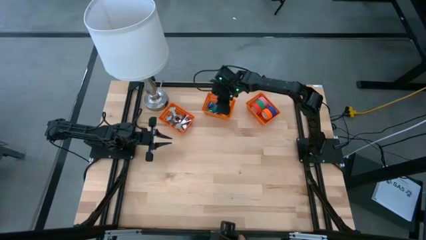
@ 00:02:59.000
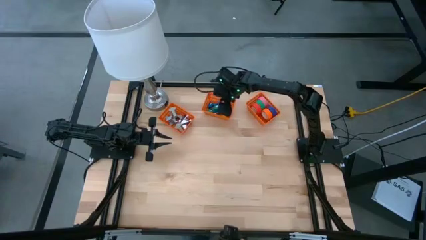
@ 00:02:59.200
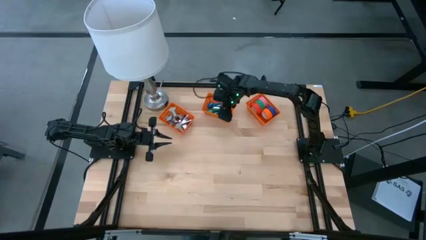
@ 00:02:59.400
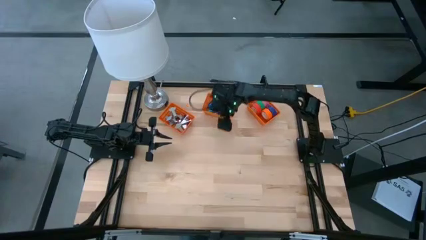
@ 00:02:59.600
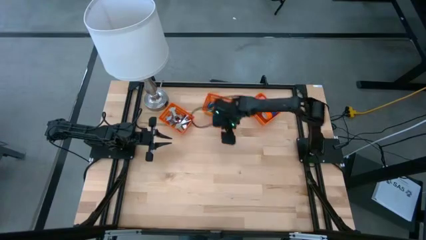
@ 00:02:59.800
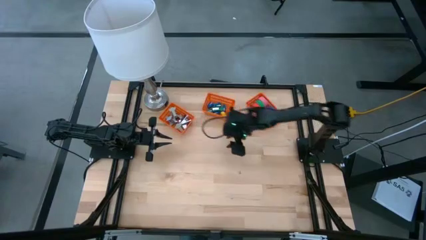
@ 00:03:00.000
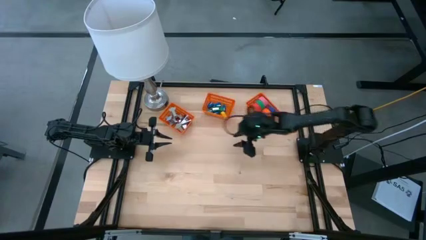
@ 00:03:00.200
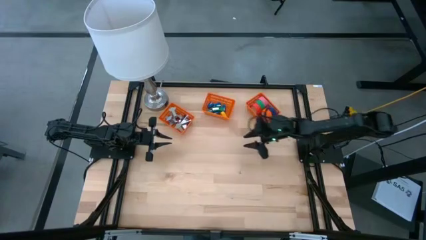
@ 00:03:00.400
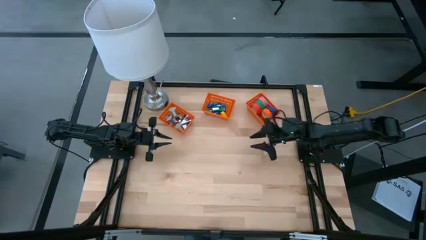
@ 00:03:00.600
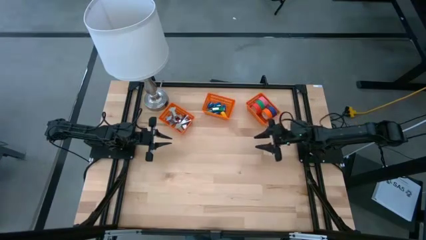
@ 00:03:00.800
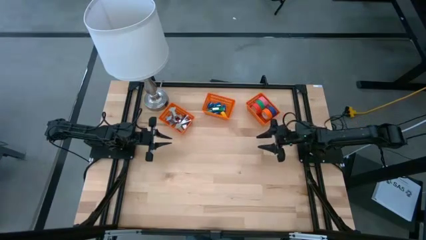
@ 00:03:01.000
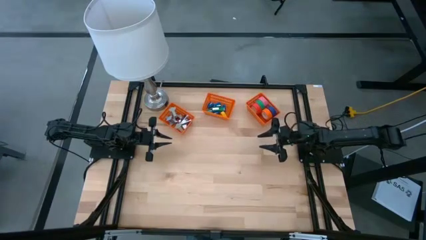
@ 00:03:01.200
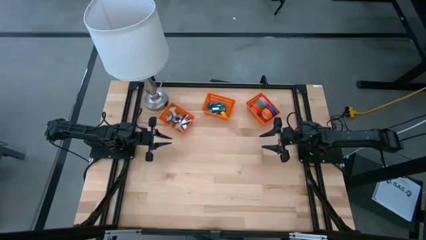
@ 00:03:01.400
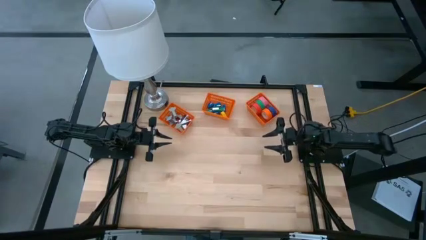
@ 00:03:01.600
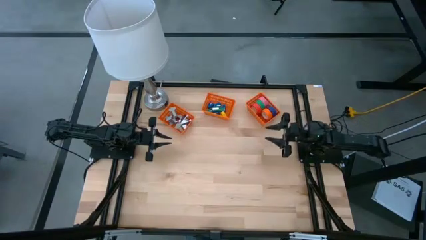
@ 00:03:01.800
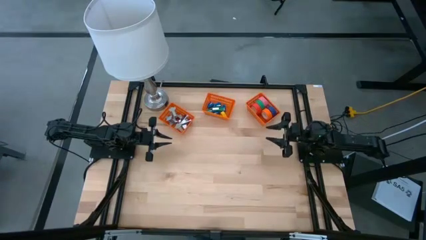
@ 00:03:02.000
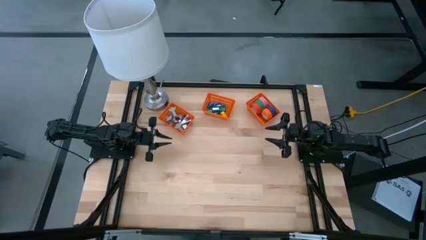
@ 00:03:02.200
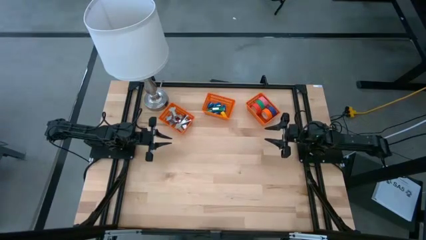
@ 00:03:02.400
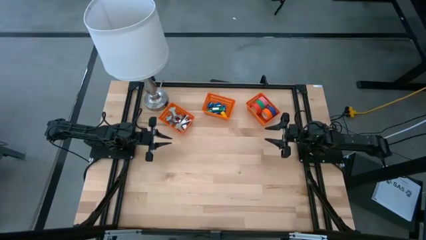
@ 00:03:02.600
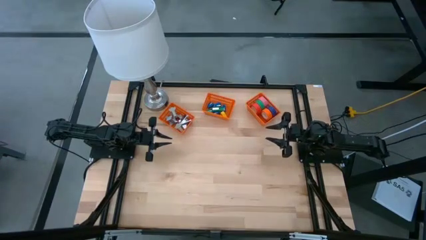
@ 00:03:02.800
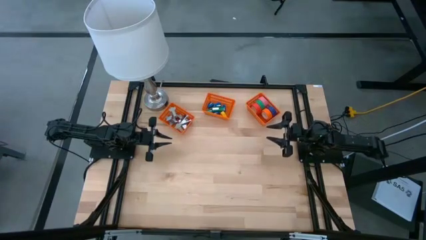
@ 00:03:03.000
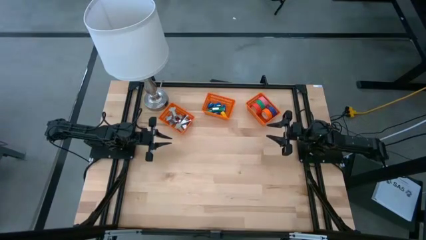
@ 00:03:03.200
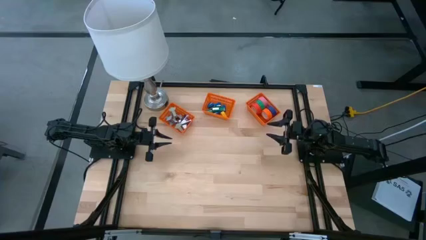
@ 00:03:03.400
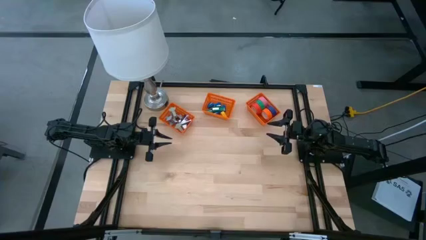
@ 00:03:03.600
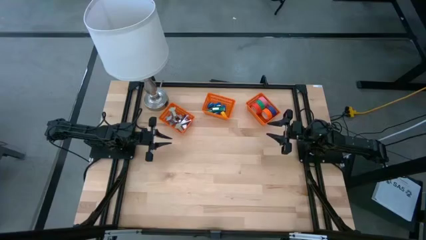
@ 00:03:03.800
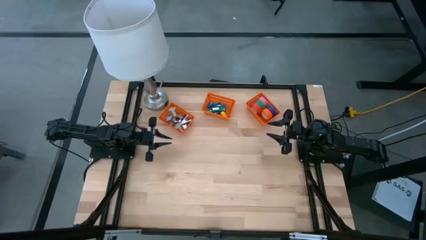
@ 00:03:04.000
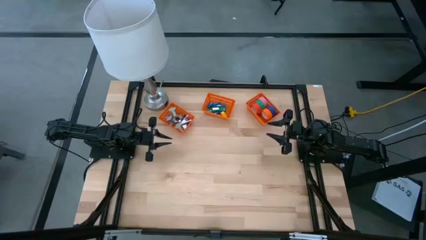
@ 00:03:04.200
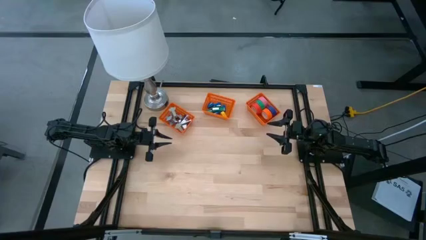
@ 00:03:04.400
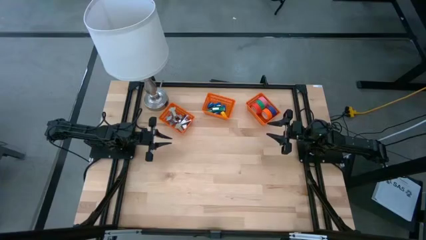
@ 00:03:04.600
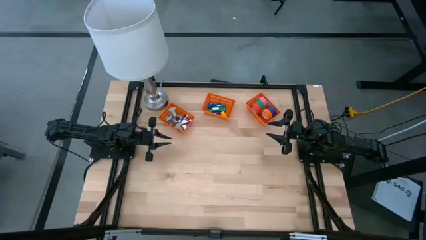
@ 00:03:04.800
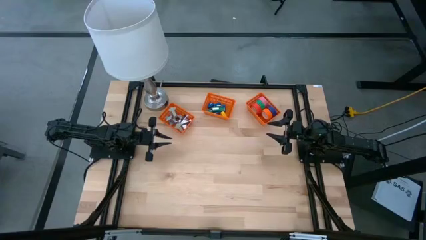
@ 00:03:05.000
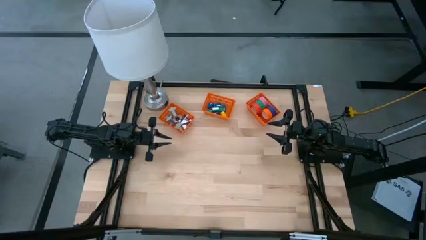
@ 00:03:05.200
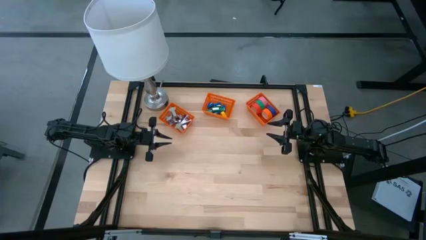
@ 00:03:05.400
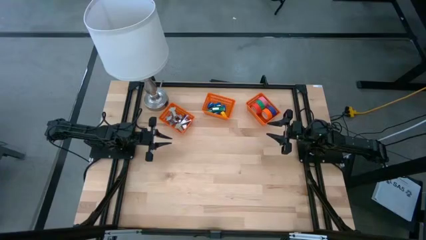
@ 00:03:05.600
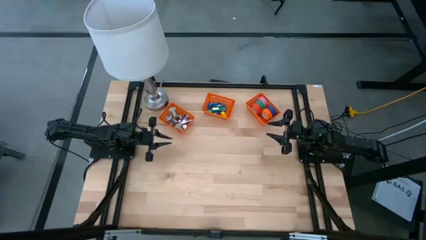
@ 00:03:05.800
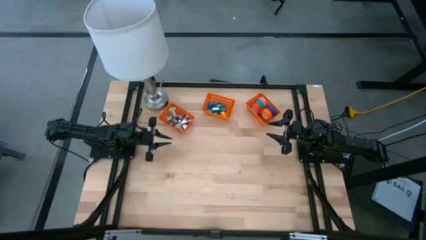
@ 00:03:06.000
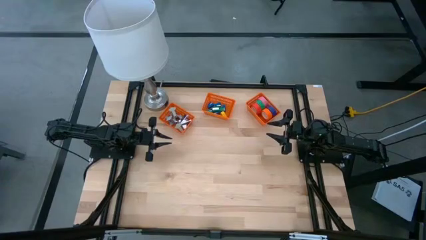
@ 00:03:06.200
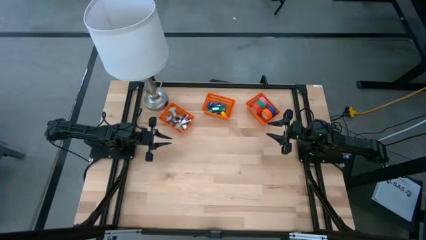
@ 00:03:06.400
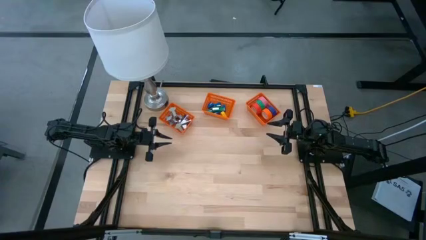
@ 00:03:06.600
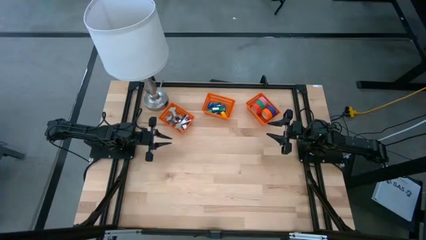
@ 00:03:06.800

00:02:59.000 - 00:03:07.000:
Task: Pick and place Stapler, Stapler remover, tape
Return to Home Position

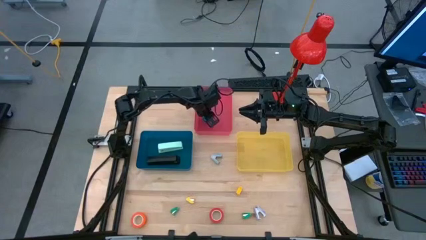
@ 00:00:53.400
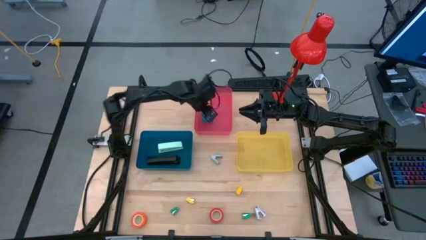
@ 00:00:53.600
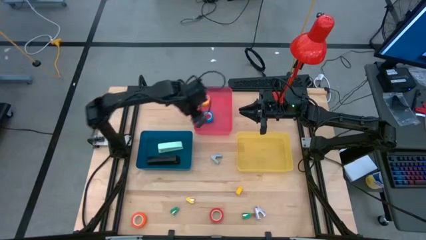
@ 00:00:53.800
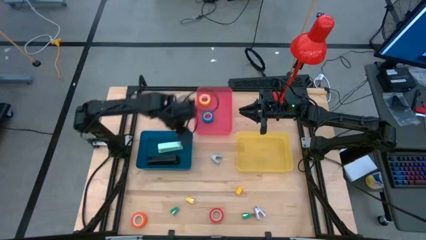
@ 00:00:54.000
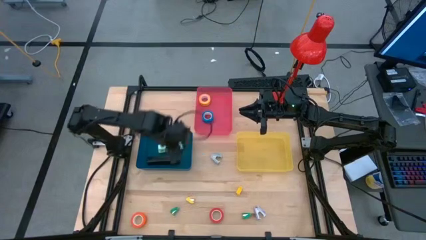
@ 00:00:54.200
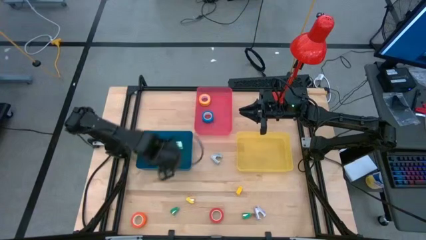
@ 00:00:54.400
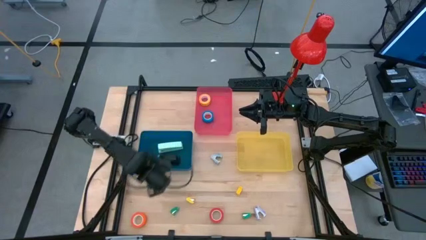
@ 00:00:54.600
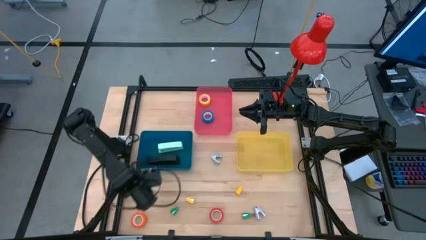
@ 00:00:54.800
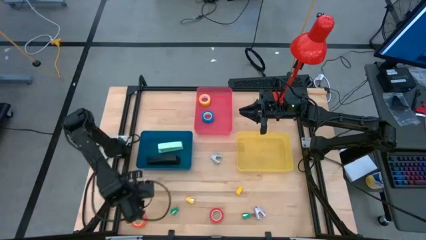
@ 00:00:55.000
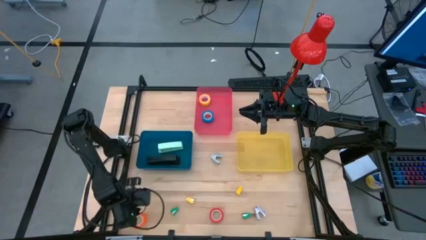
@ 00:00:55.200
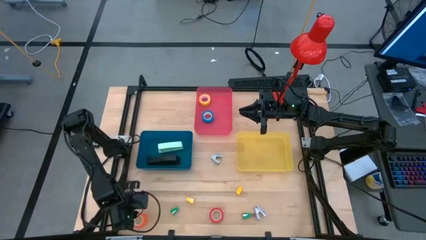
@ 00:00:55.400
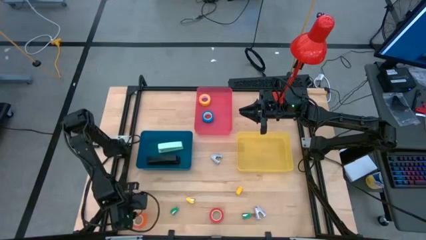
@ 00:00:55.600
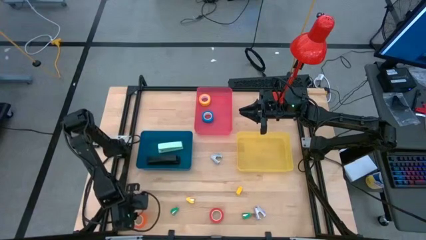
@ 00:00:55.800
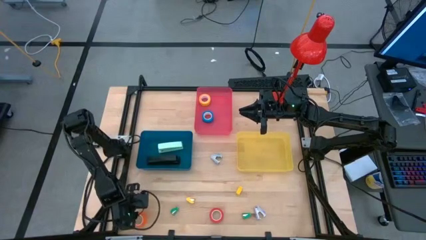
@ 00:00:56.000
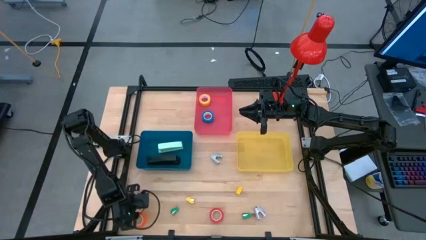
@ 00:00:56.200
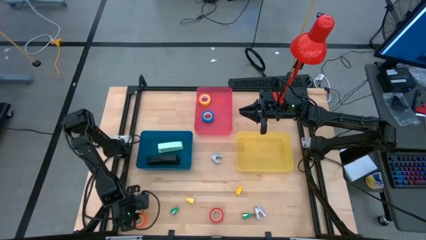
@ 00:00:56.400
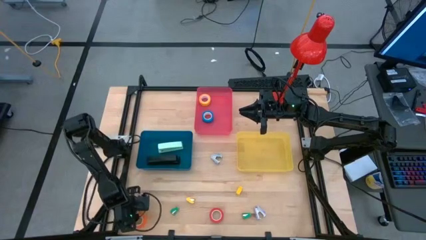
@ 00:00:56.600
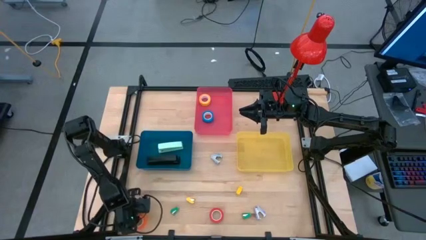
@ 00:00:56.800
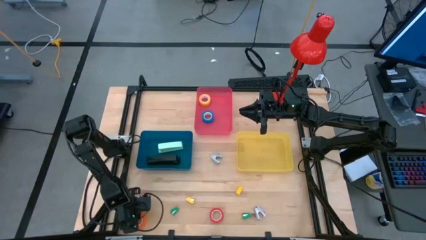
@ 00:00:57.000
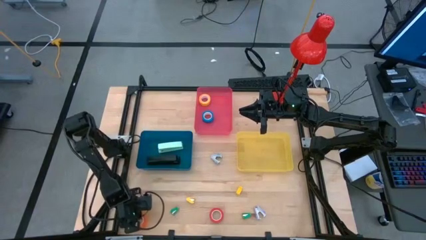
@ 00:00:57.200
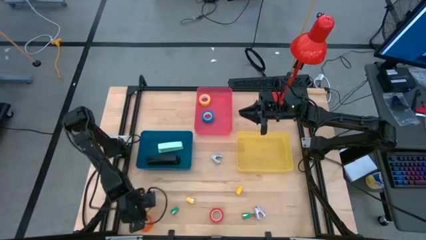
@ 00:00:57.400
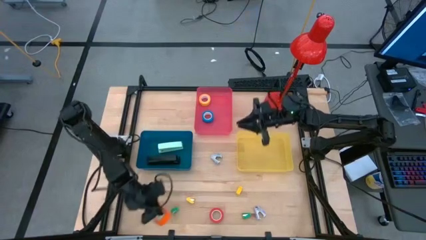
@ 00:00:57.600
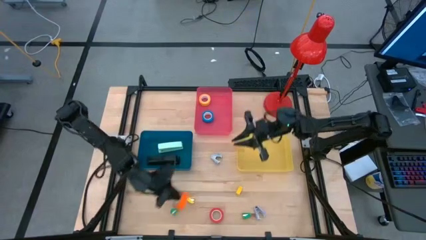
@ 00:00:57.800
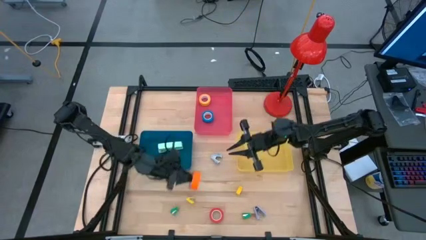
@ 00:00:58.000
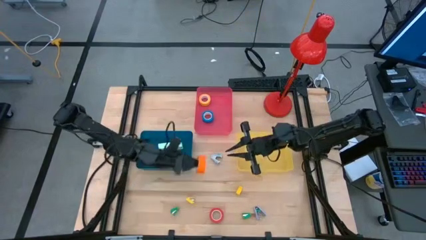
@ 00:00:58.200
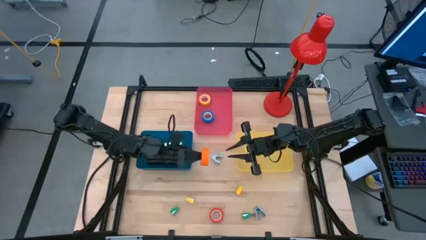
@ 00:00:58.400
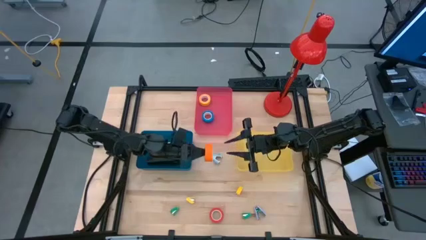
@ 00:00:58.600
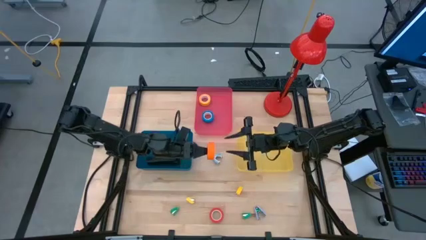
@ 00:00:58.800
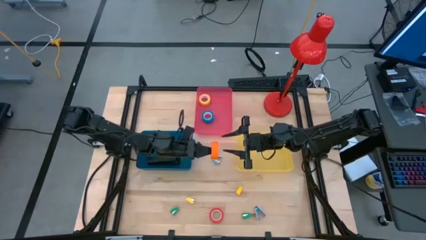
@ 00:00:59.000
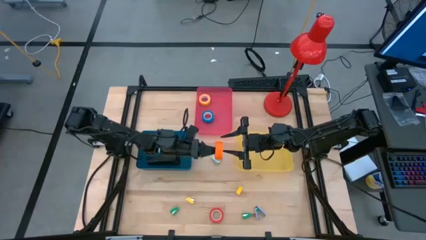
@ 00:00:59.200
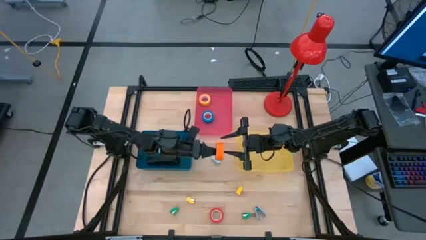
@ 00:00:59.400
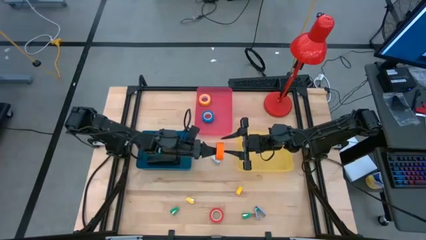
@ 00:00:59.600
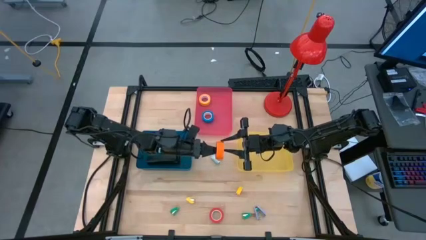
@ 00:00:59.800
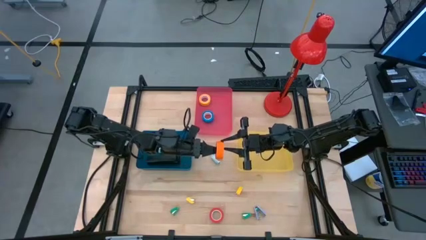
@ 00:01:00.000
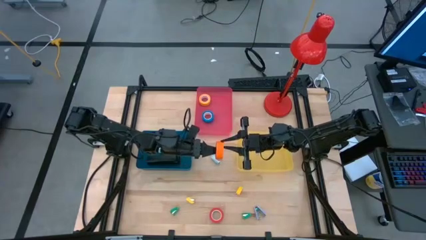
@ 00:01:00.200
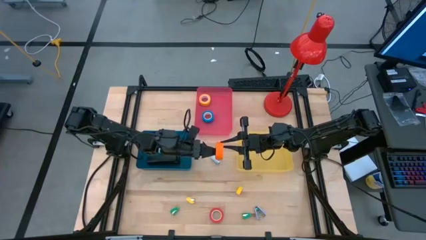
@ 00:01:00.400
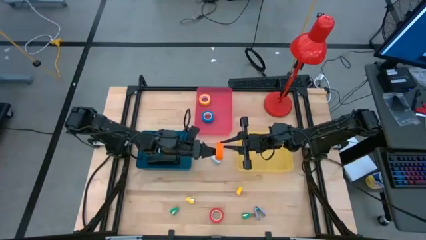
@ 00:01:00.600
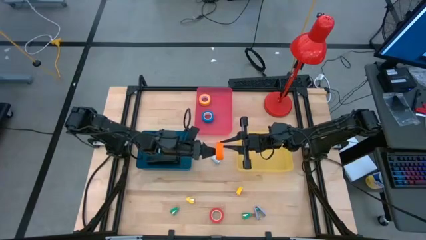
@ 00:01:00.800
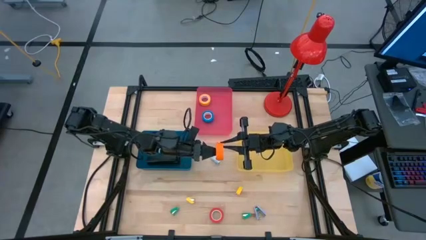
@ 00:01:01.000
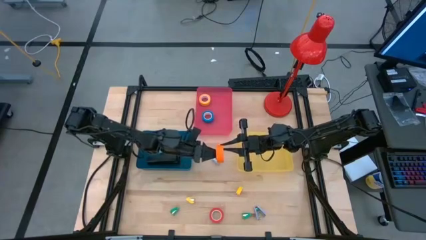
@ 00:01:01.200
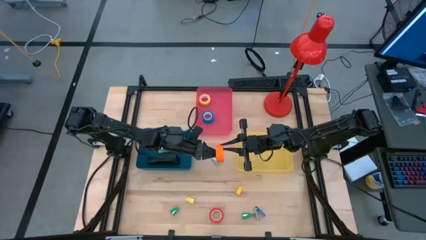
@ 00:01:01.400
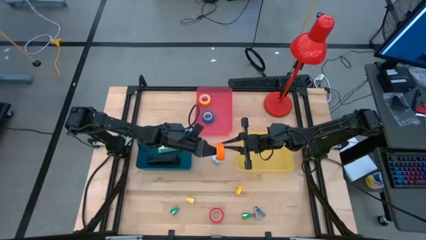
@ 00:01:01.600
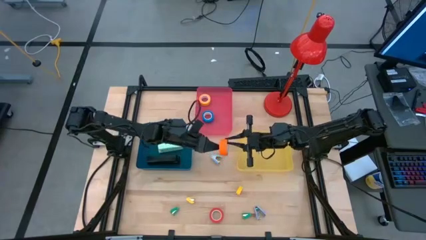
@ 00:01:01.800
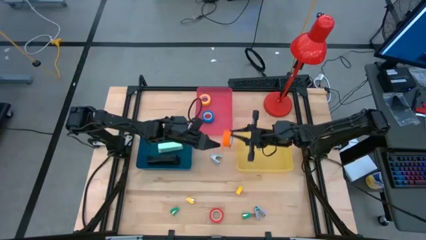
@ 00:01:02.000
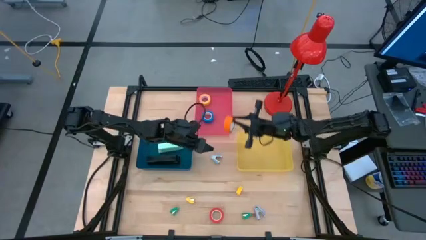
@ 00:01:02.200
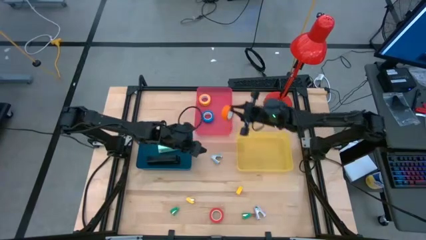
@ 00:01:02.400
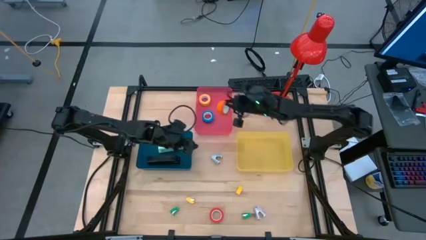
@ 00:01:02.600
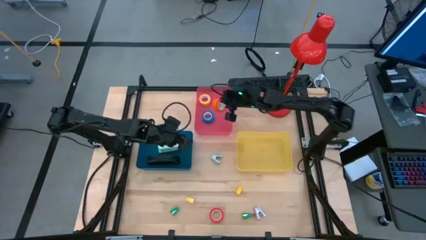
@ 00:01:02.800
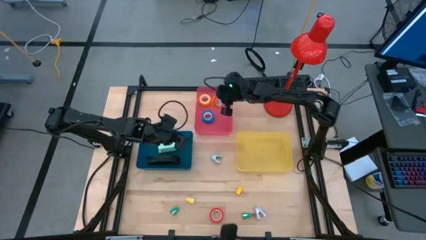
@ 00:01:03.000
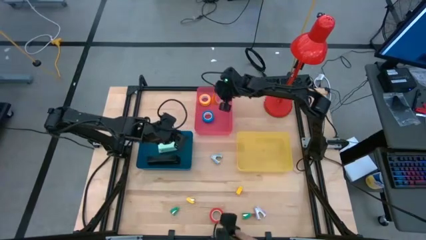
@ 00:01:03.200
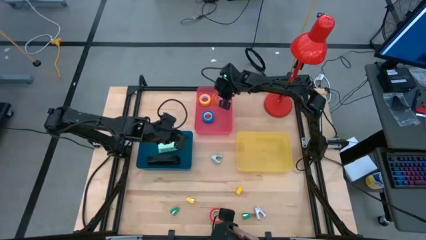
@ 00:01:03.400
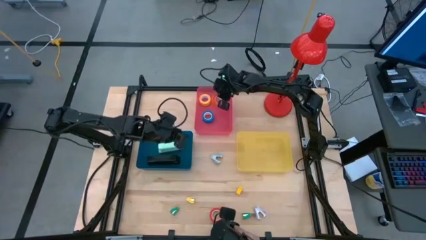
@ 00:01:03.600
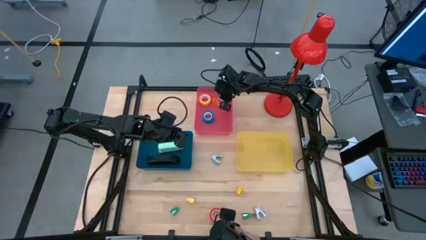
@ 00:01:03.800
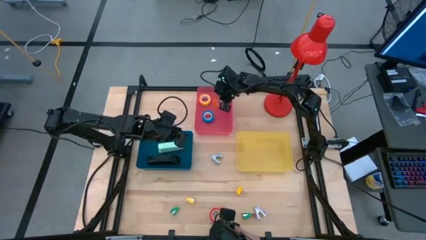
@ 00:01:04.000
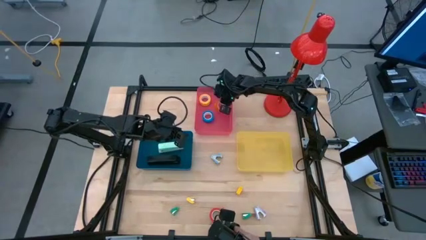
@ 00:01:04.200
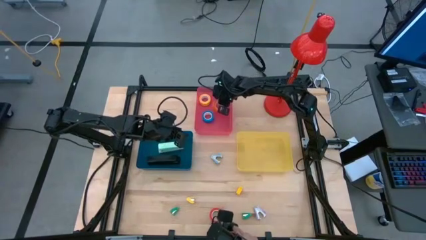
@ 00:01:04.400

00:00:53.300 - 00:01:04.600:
Task: Pick and place Stapler, Stapler remover, tape
Put the orange tape into the pink bin
